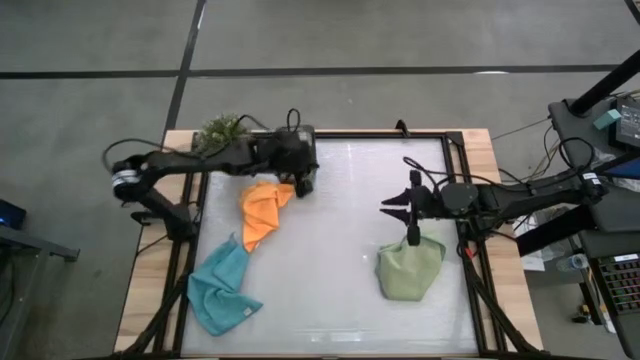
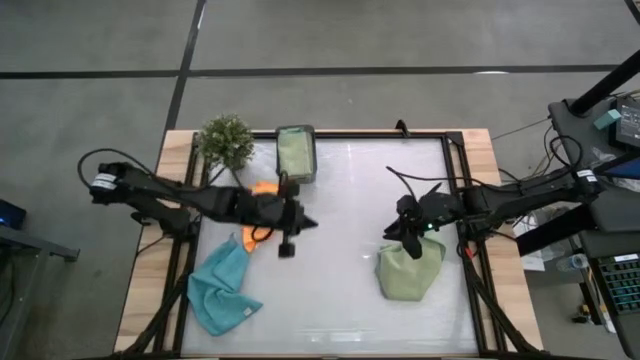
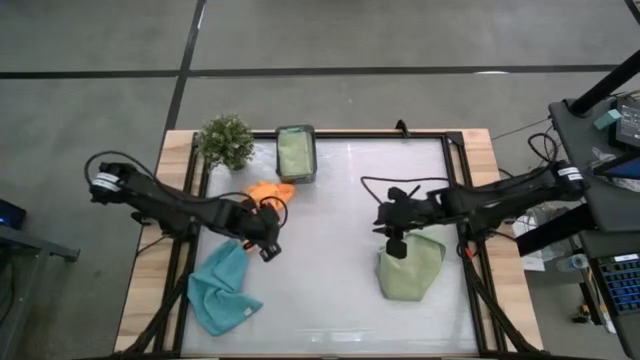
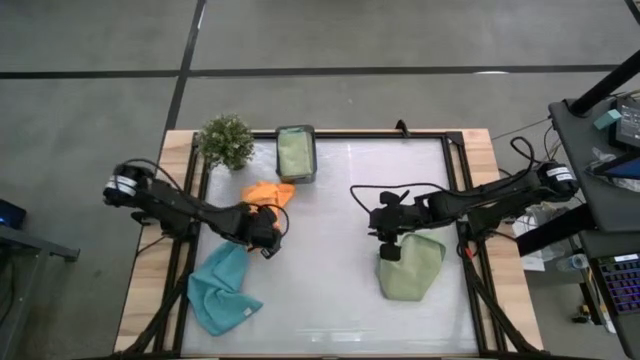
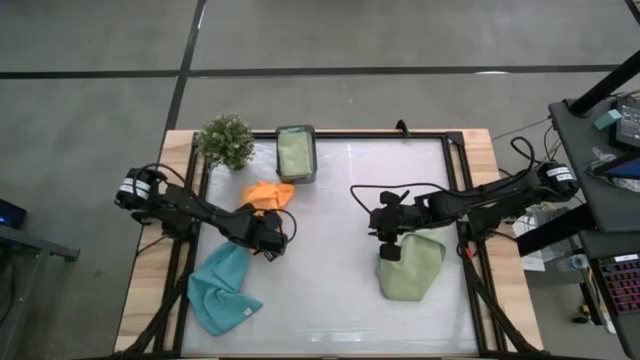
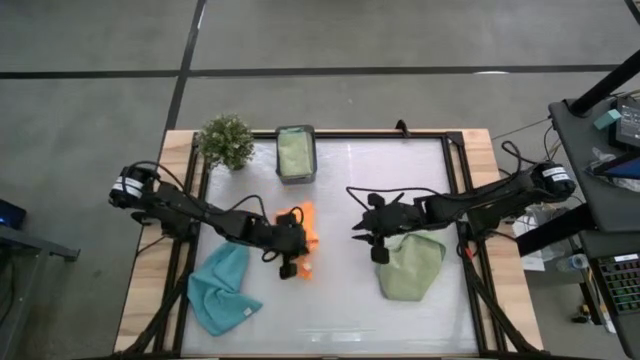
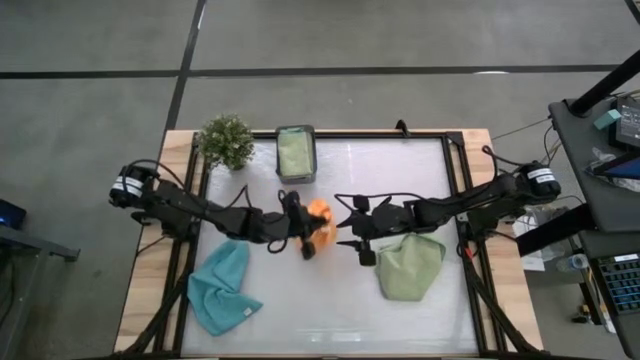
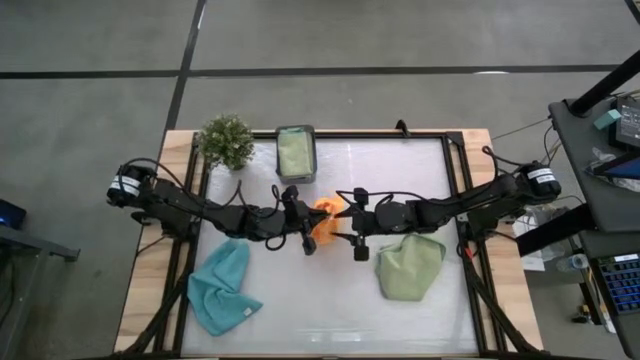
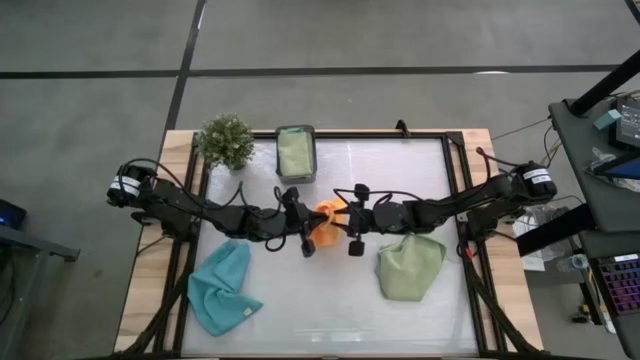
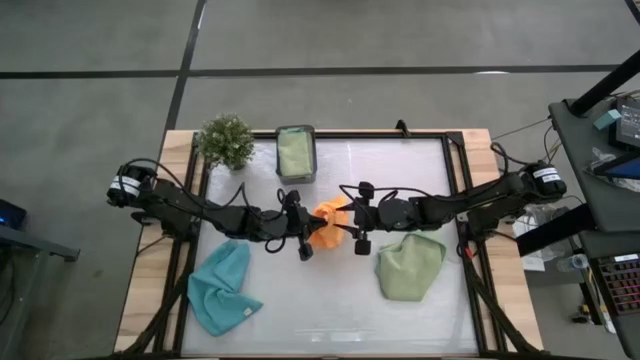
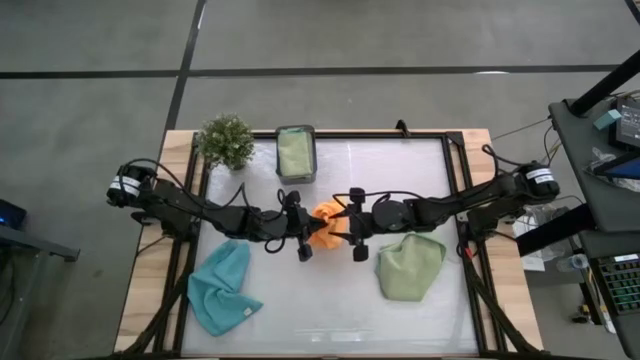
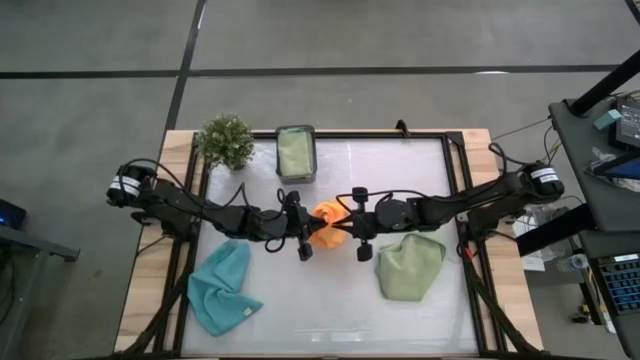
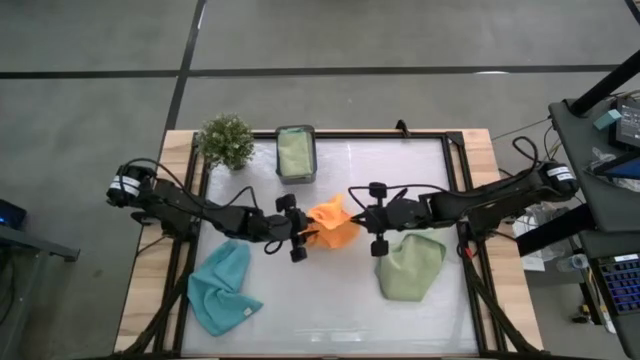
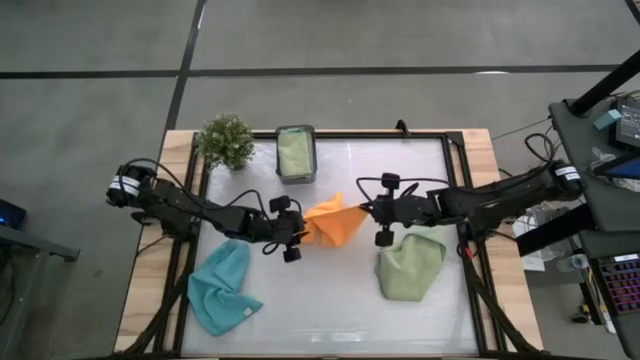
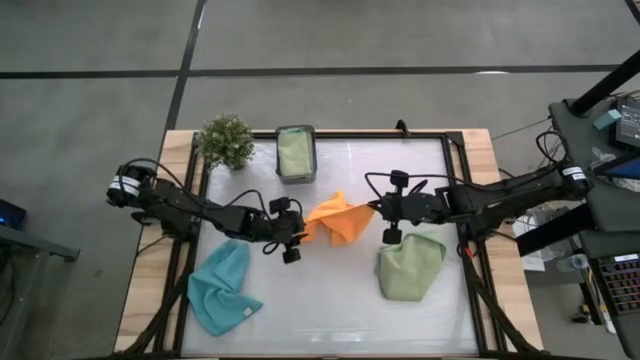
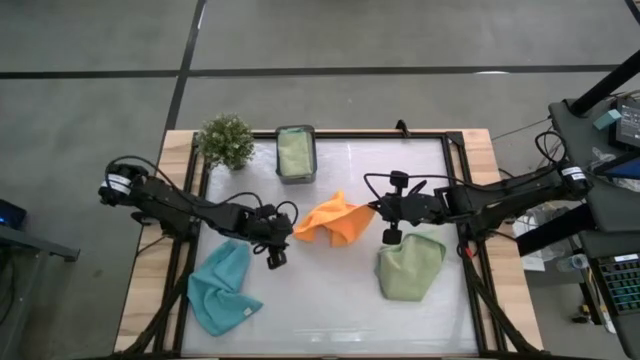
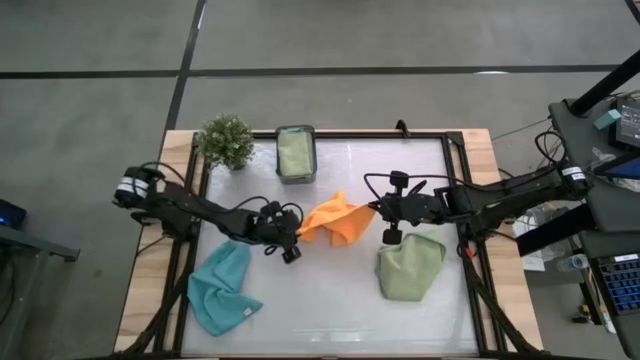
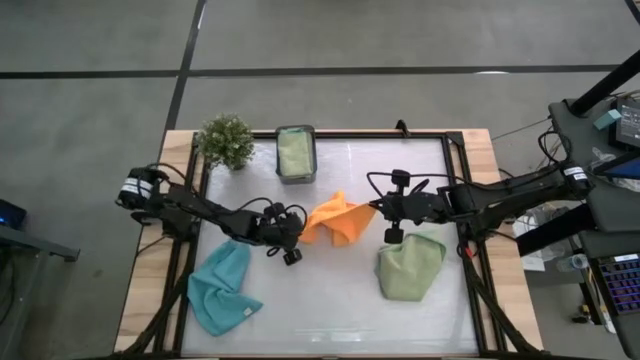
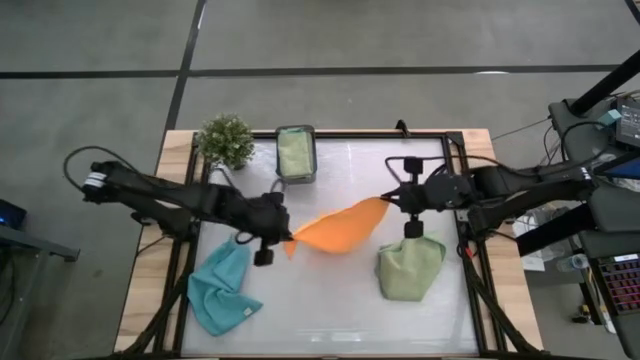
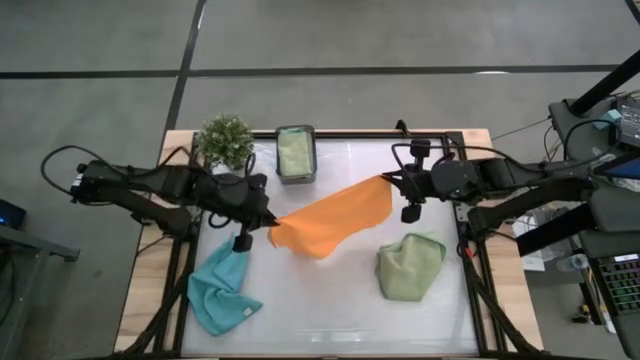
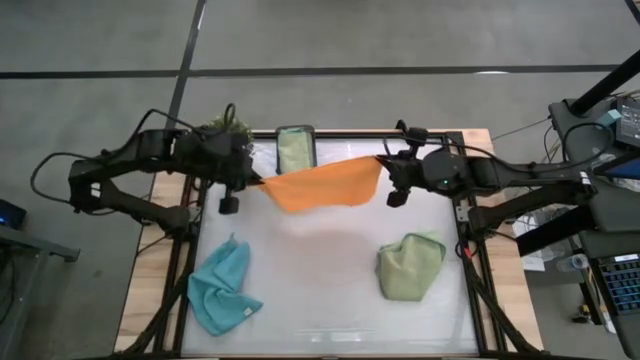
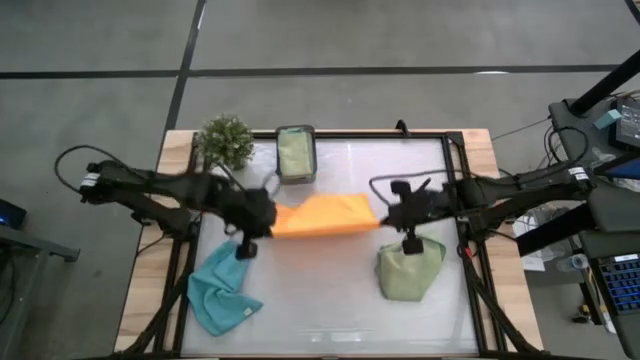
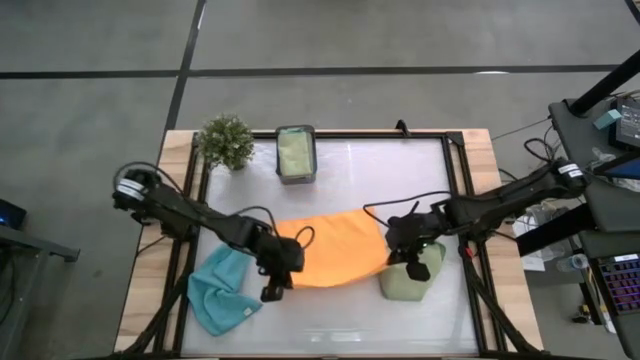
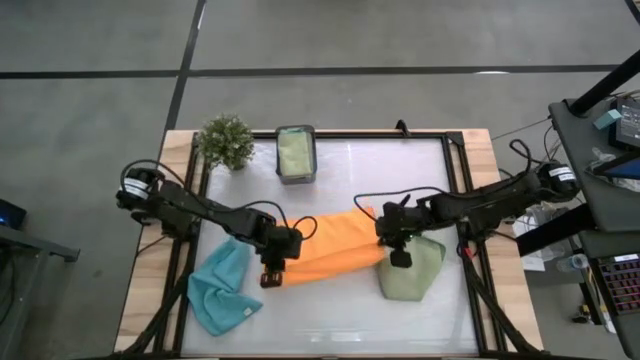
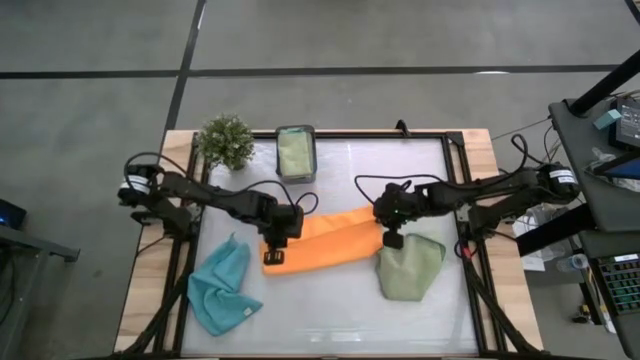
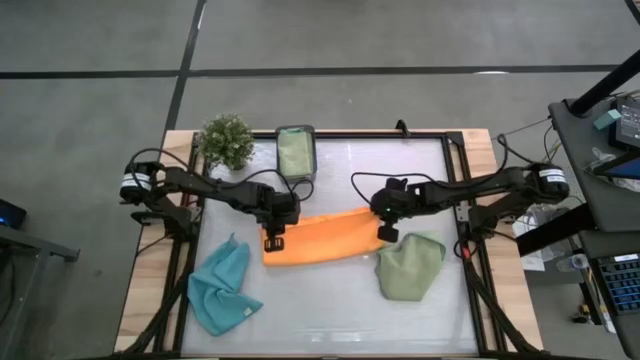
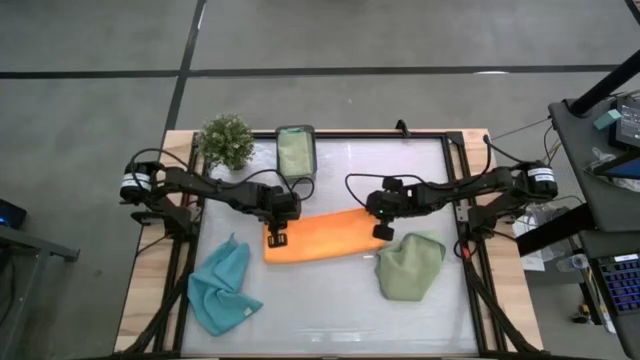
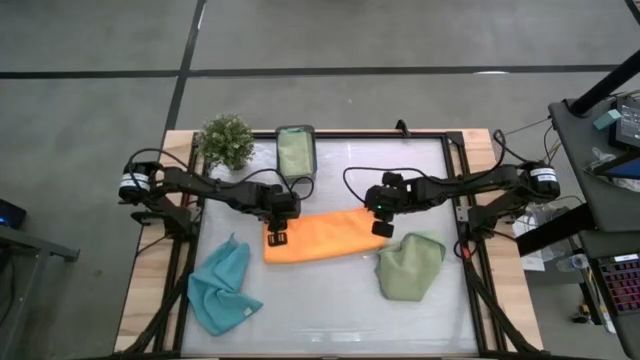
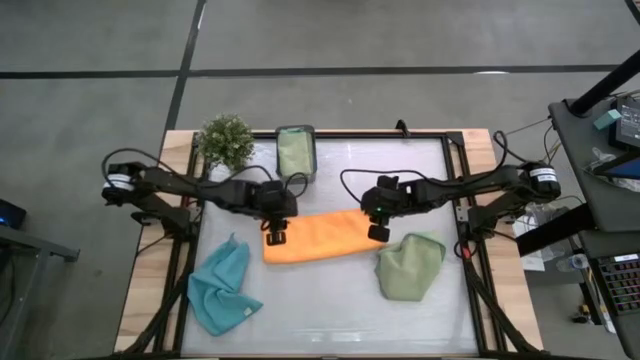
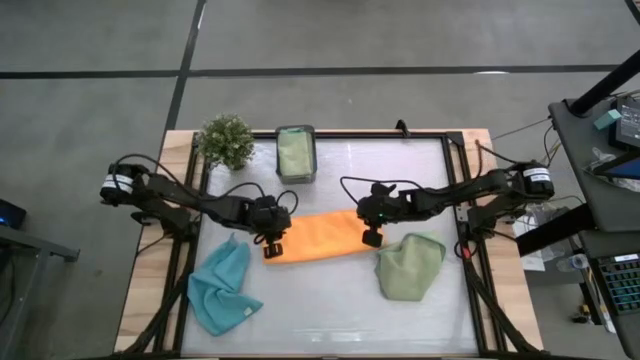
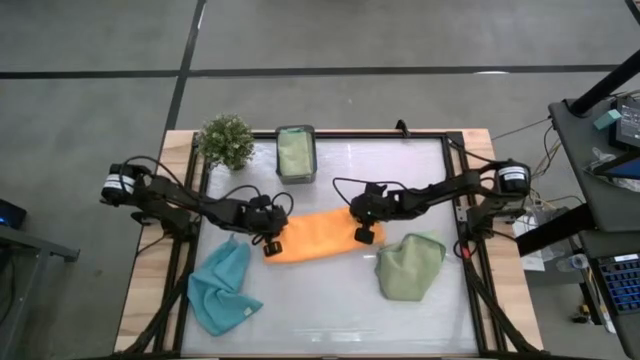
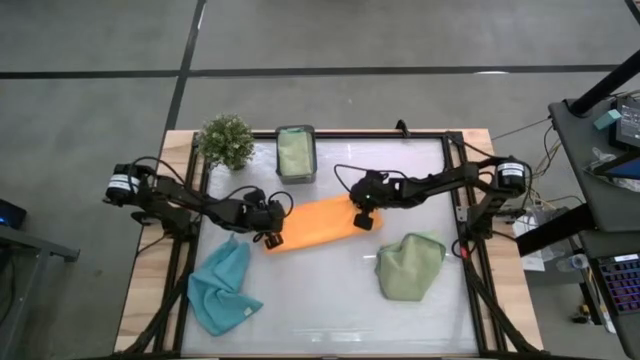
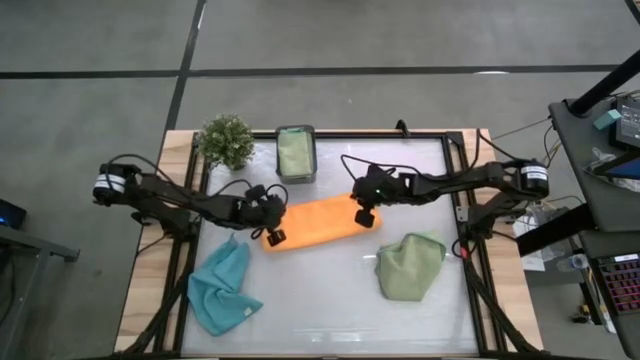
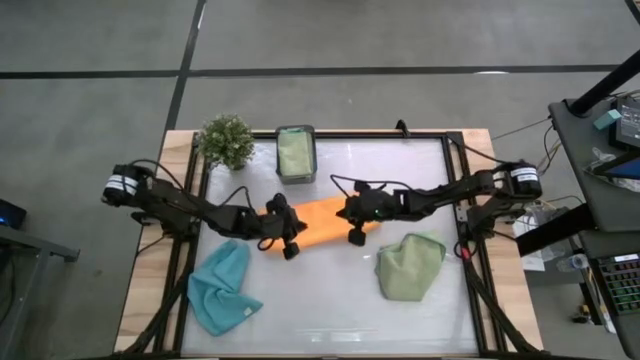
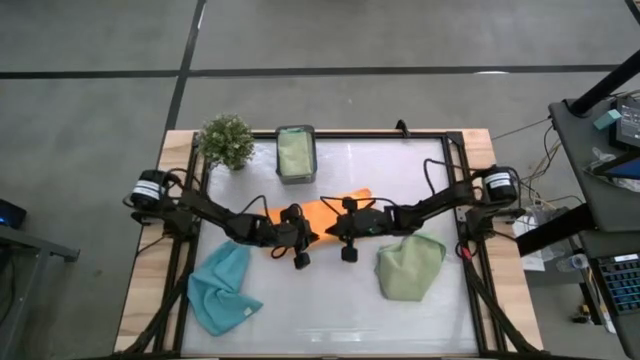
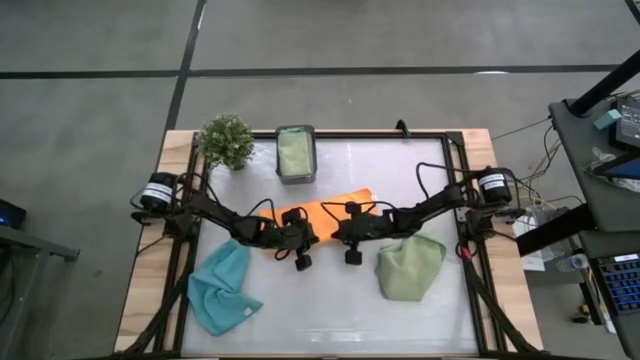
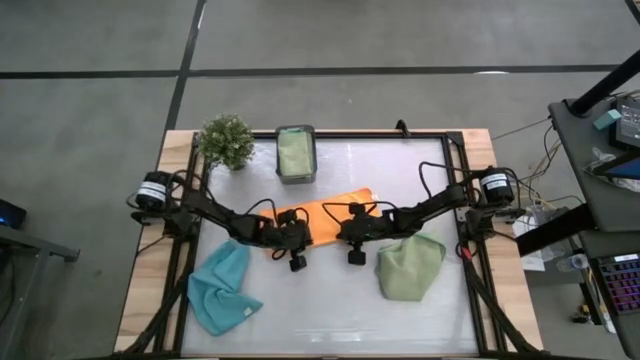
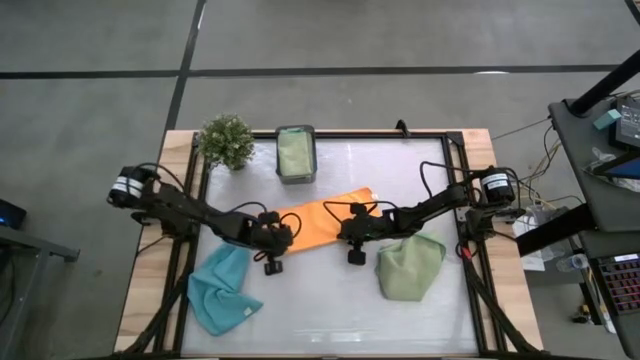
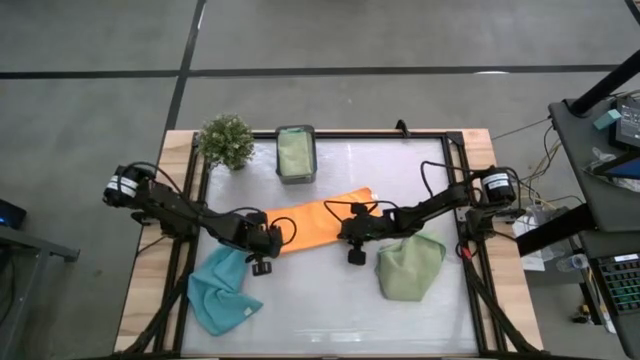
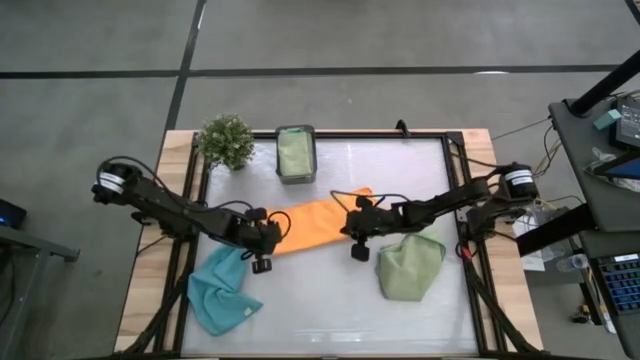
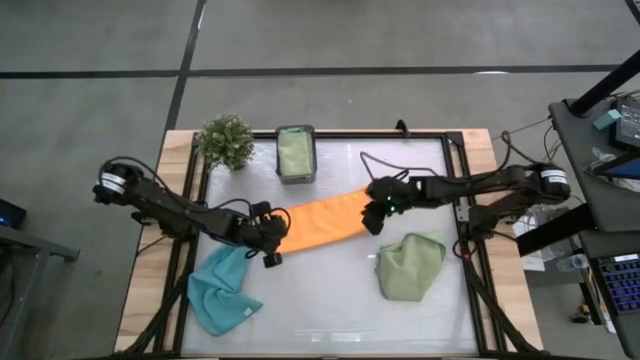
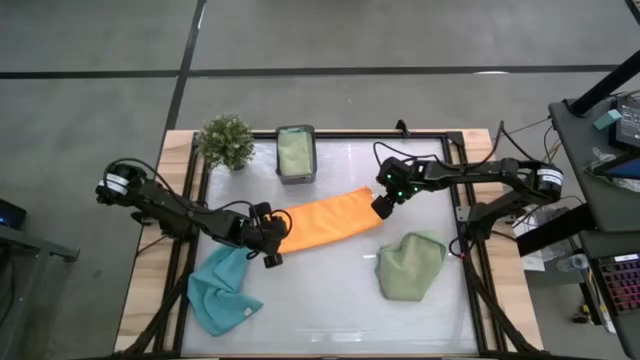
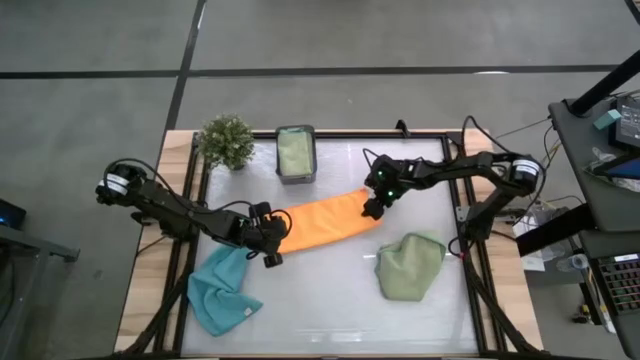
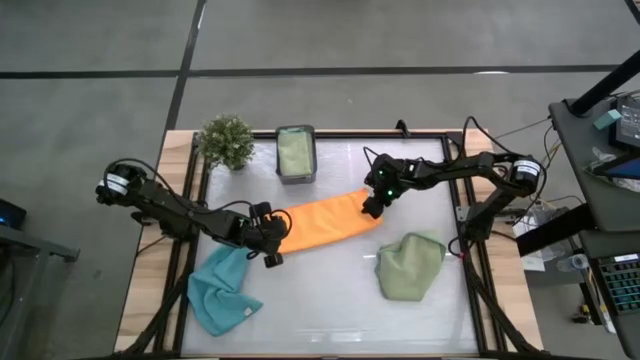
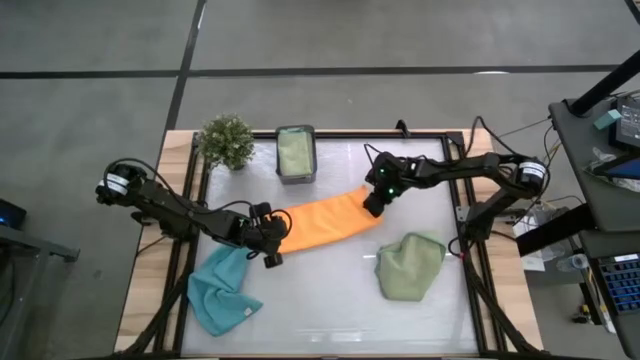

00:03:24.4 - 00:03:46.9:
Task: Fold microfiber towels
Fold the yellow towel
